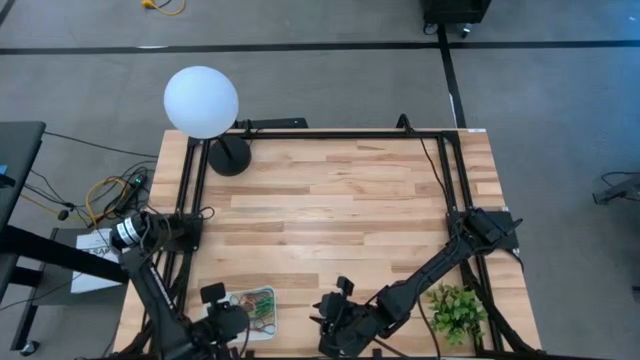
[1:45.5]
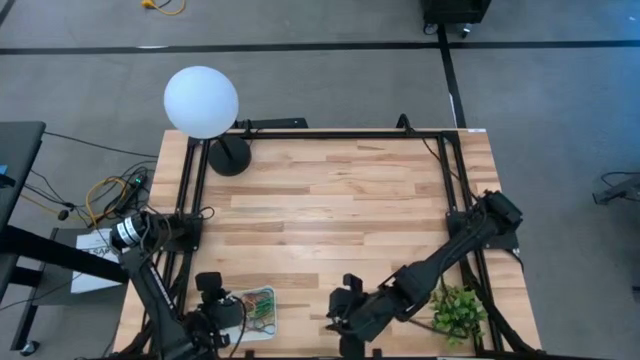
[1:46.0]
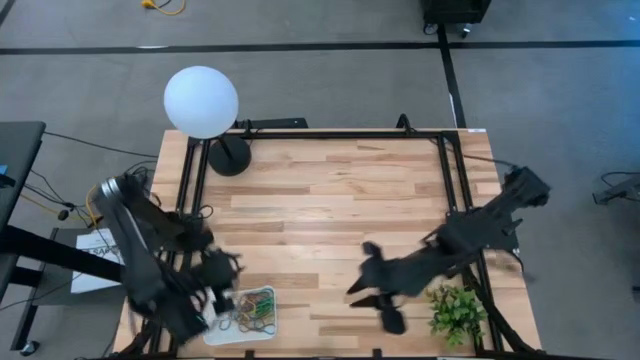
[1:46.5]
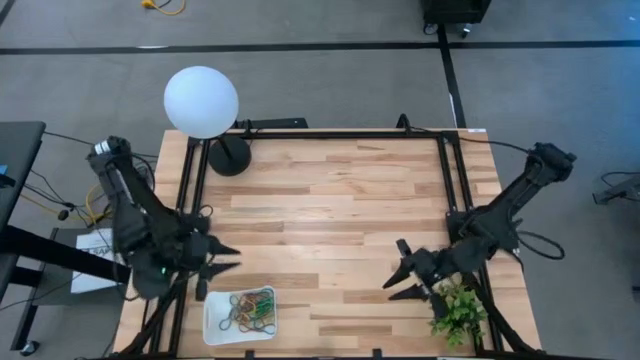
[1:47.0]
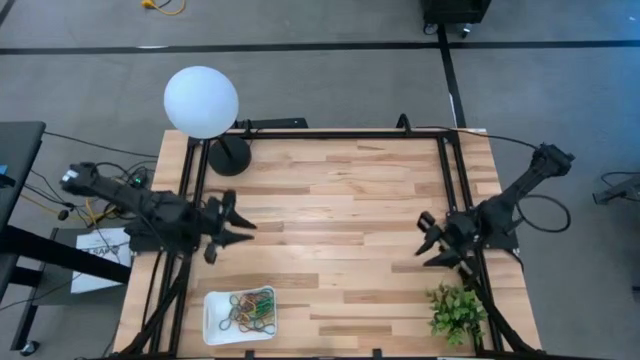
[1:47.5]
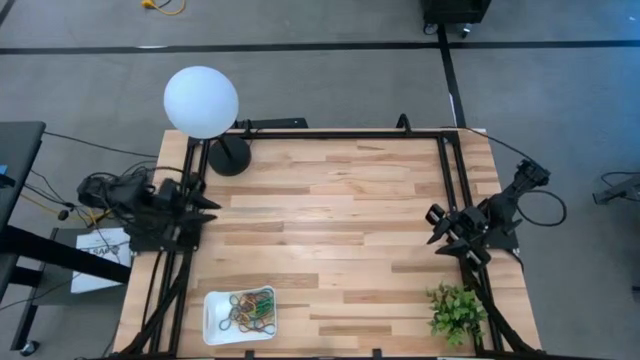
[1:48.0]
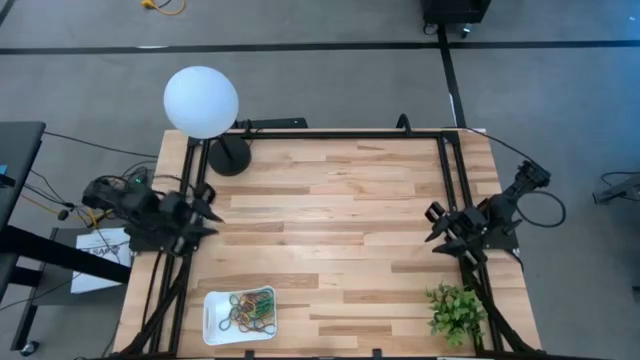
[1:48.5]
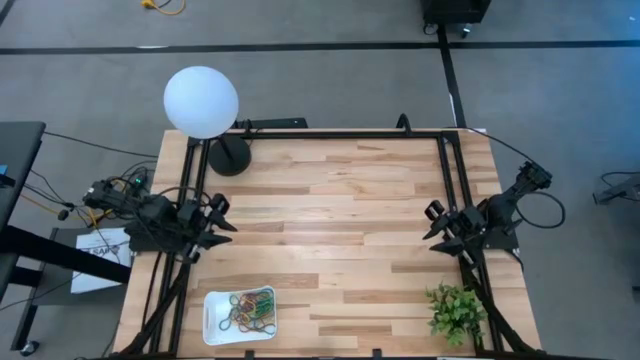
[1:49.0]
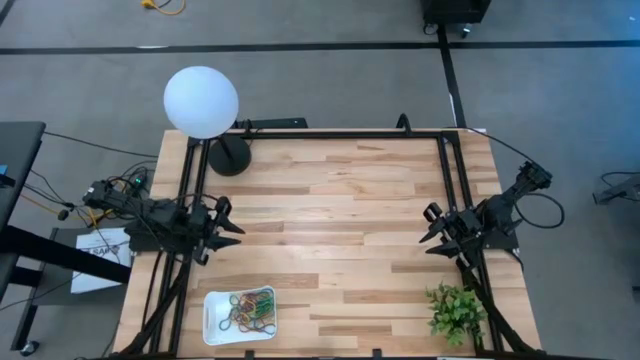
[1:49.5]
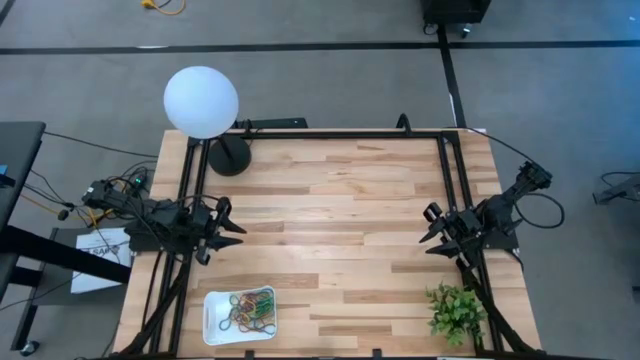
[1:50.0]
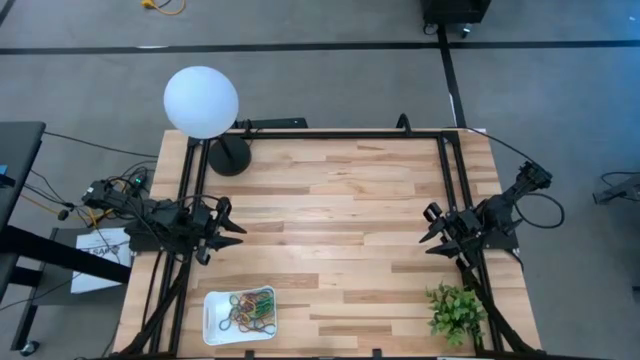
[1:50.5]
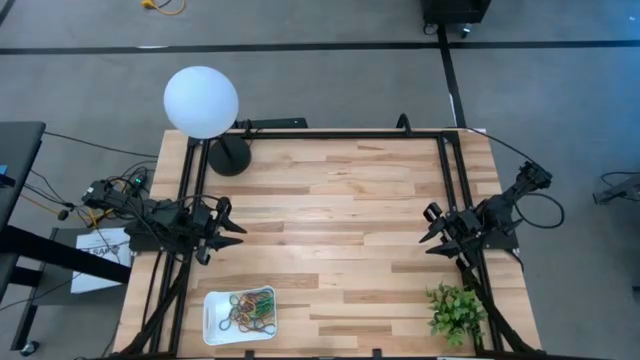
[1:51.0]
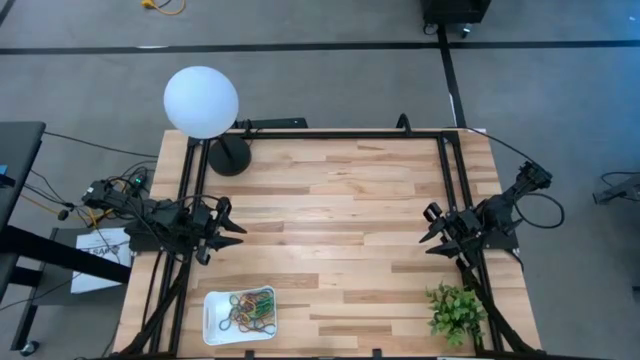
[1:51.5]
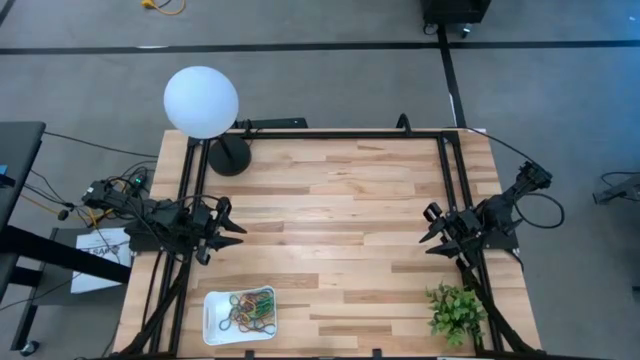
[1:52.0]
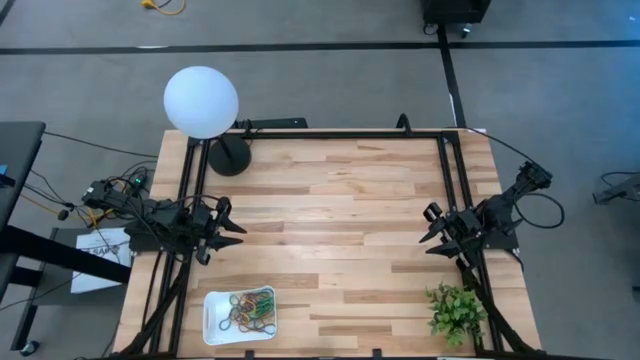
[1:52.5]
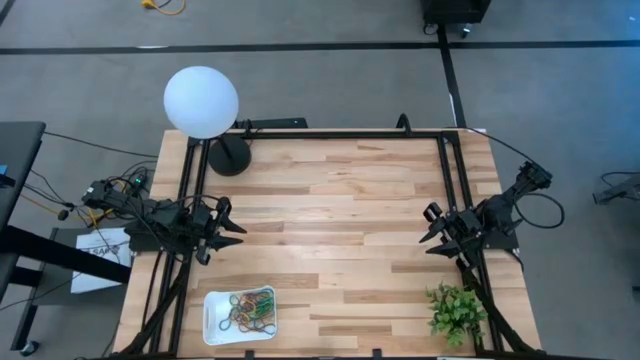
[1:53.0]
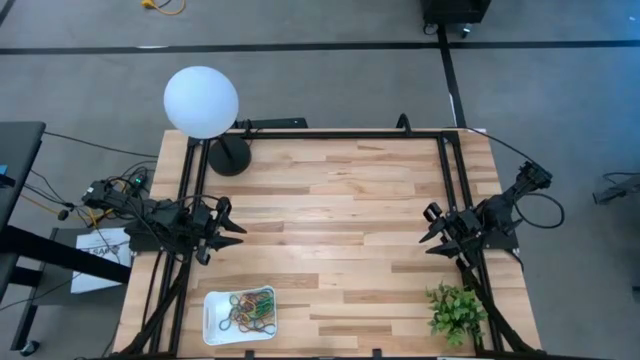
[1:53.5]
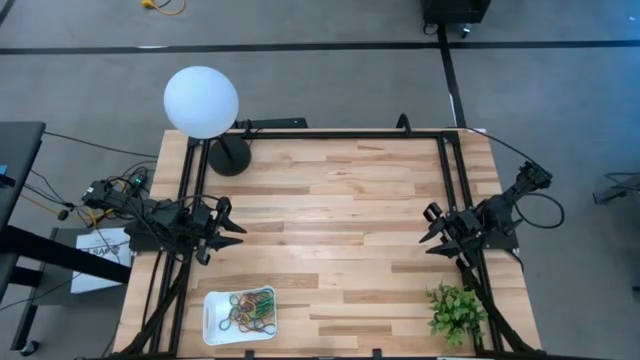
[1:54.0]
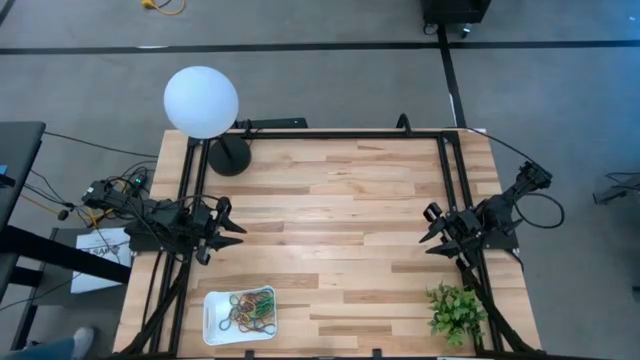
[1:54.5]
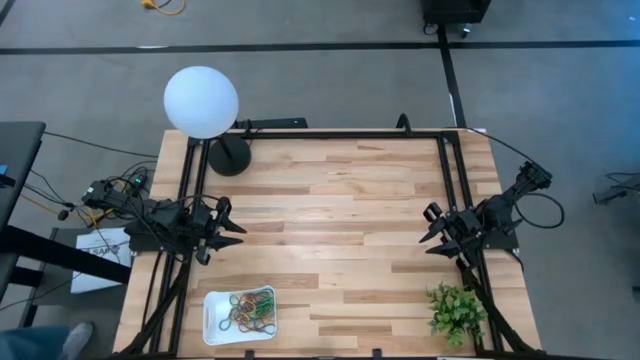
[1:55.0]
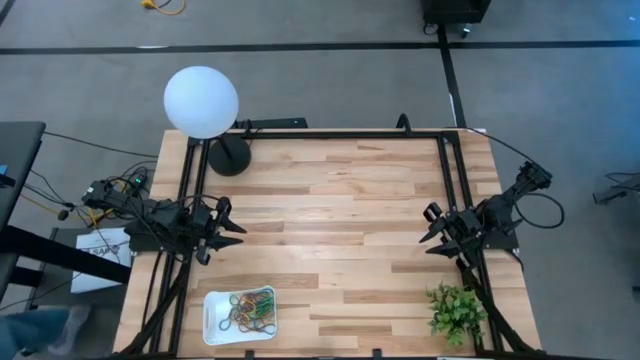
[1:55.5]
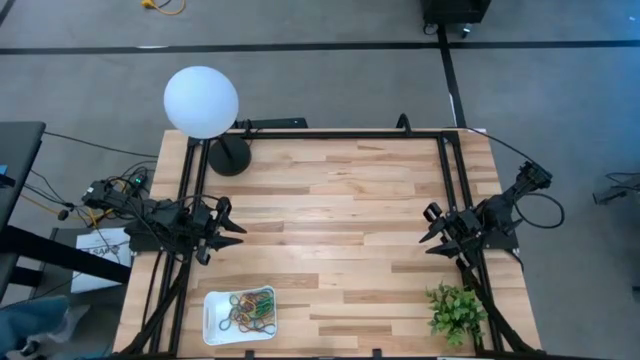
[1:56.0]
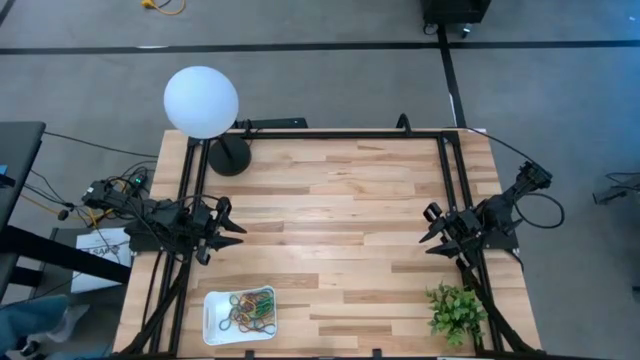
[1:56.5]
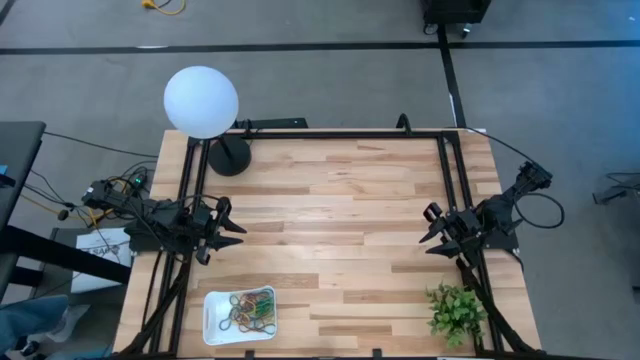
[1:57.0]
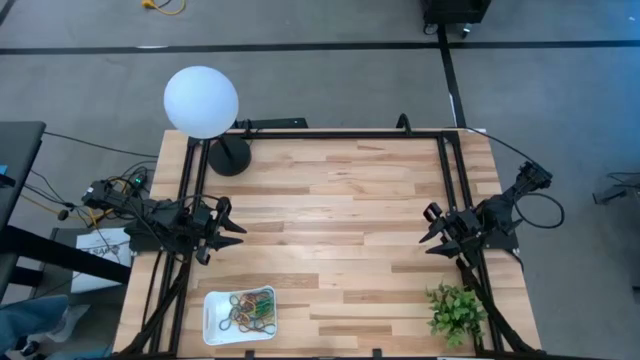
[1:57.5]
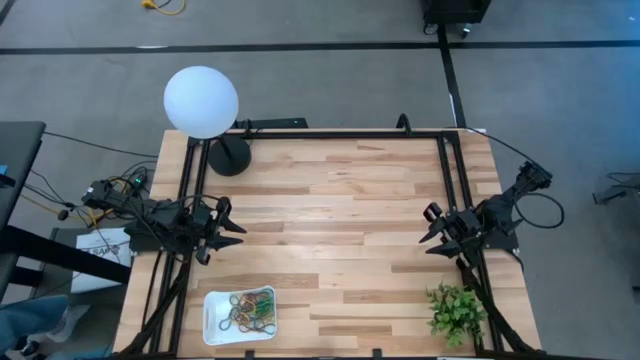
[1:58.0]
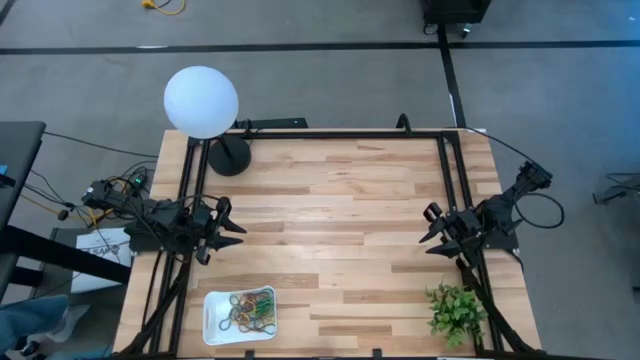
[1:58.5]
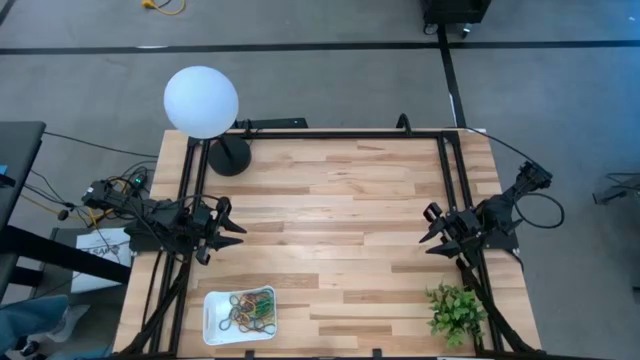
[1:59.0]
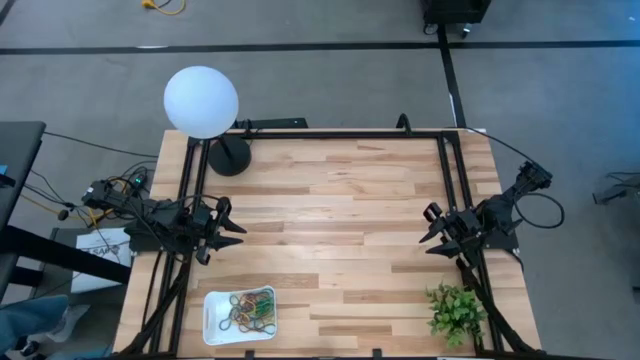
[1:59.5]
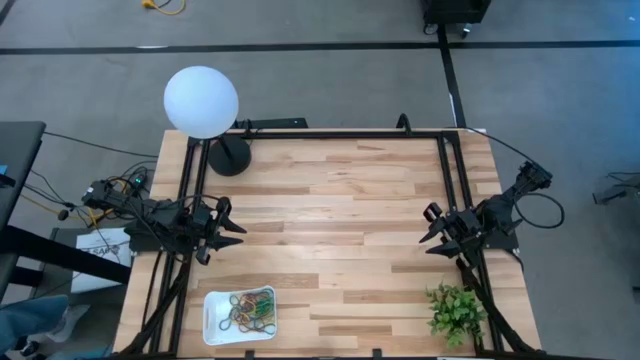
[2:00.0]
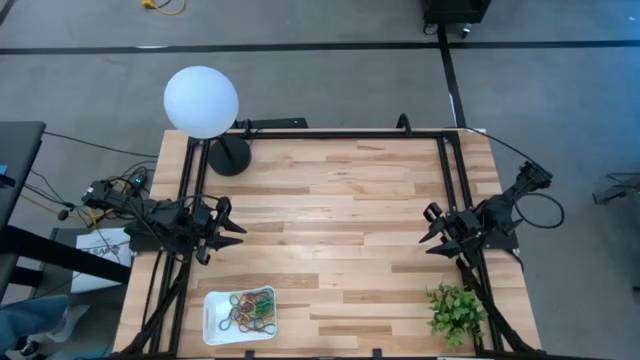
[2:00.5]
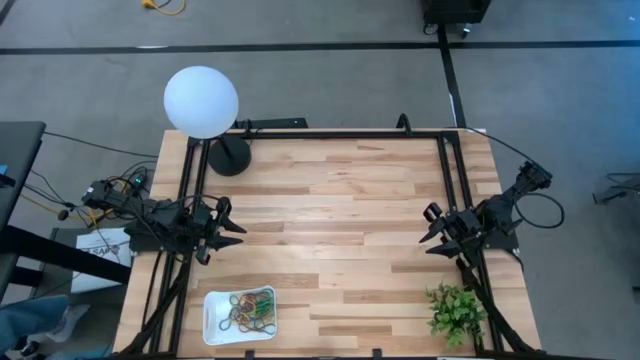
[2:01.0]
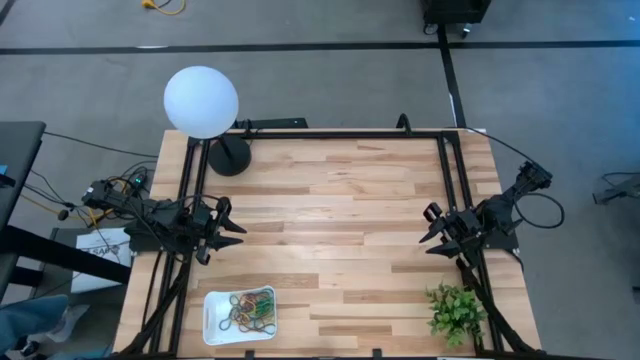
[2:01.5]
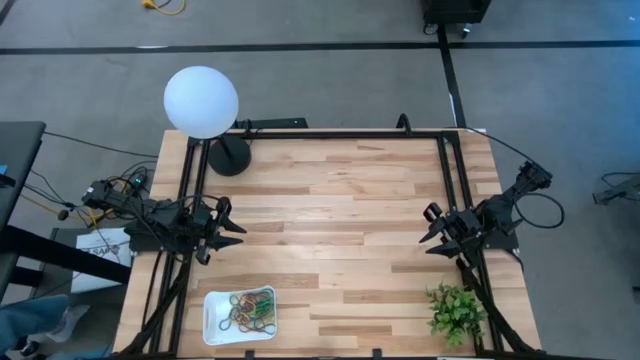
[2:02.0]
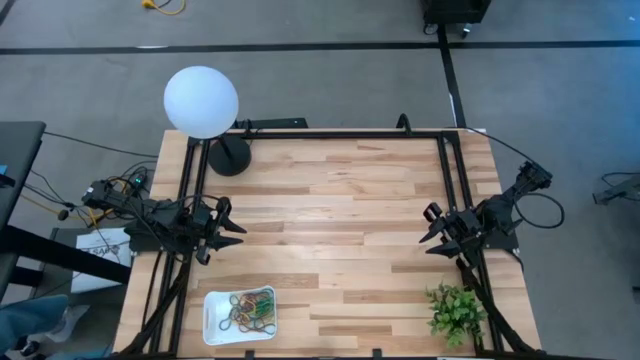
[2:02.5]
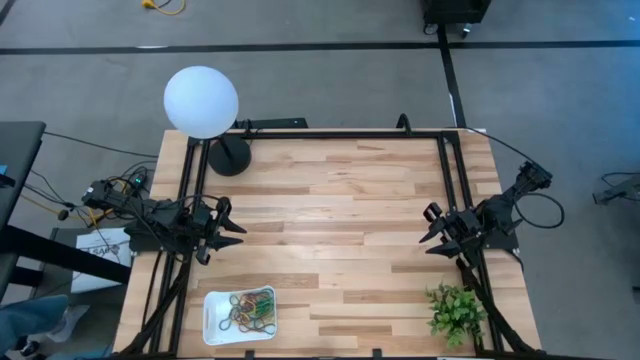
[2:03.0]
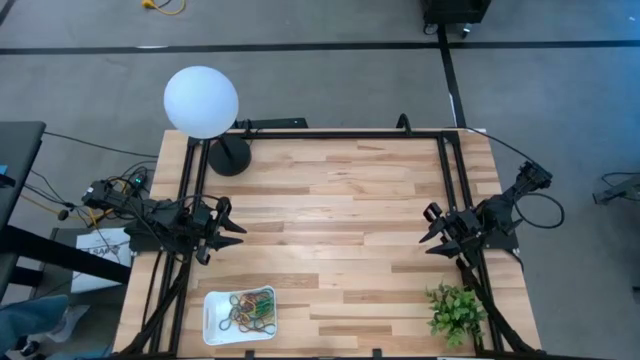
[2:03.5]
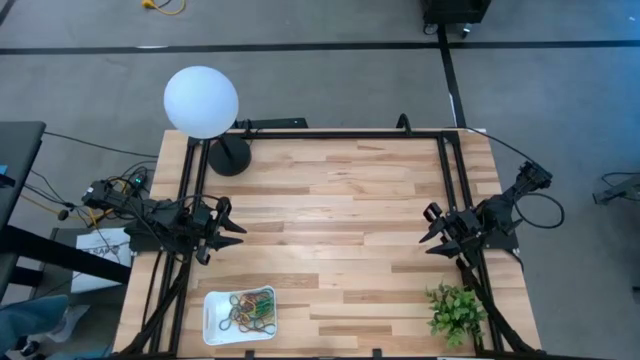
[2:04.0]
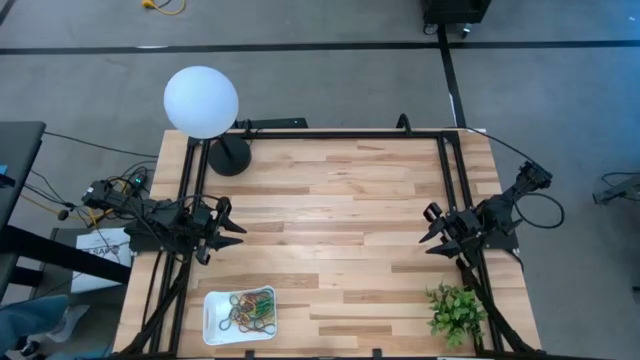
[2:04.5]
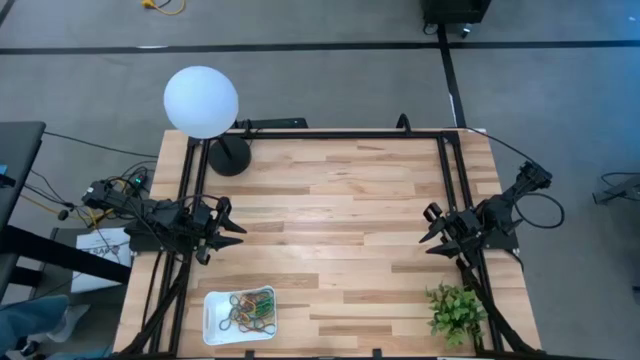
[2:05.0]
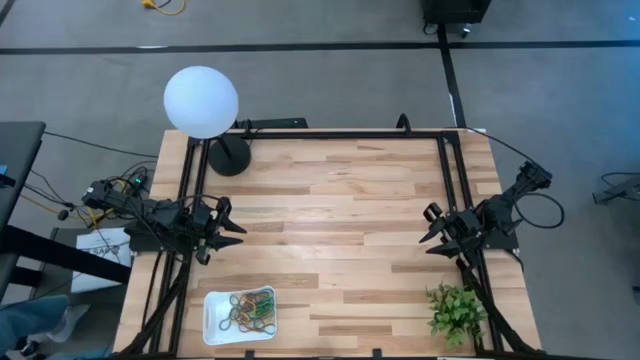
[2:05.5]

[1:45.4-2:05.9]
Task: Pick and place items into bin
Return to Home Position
